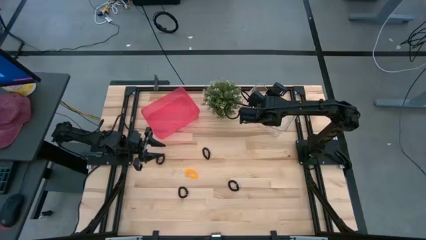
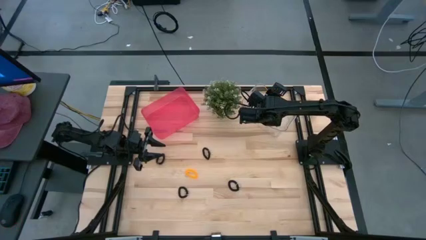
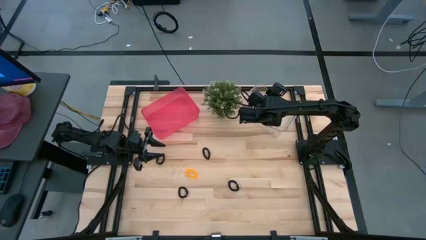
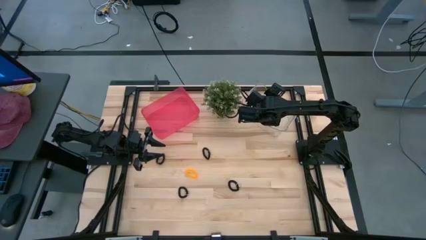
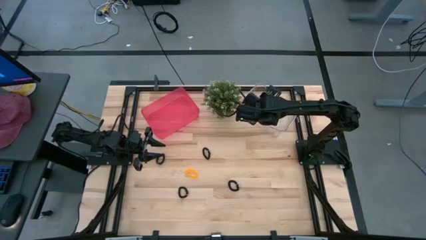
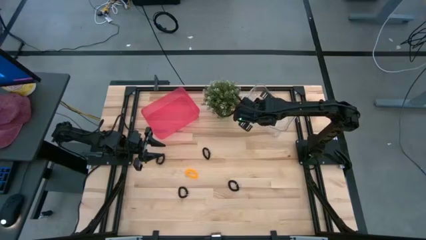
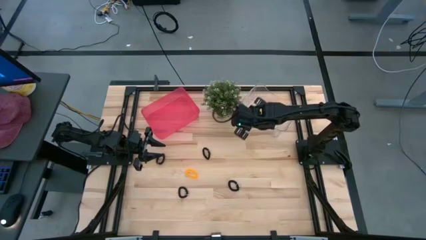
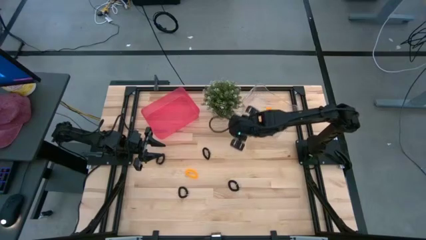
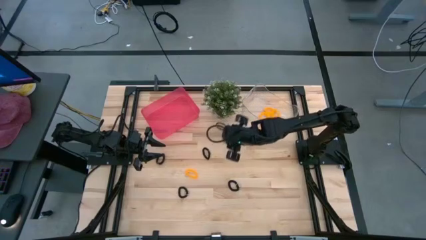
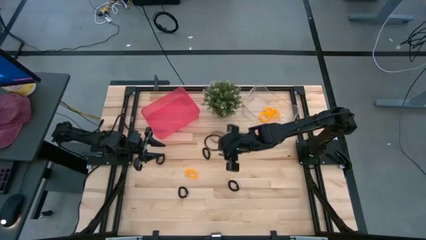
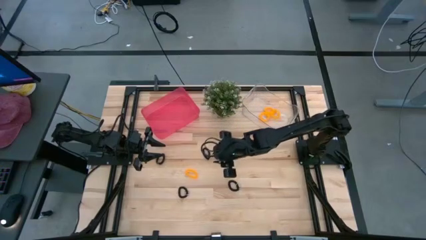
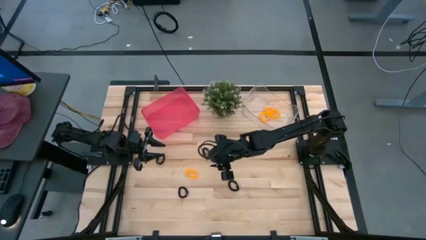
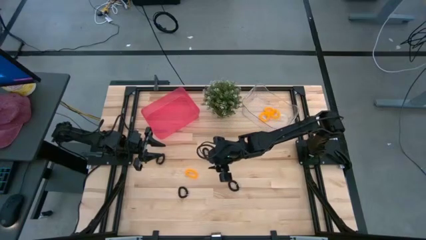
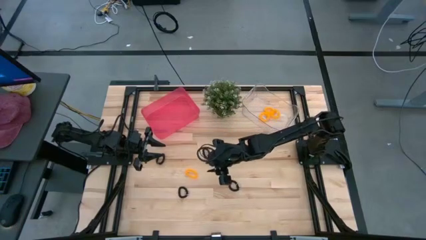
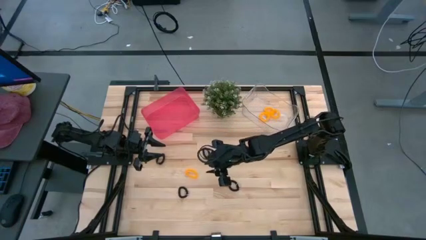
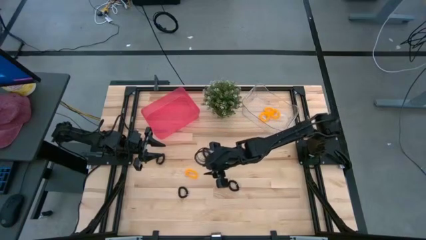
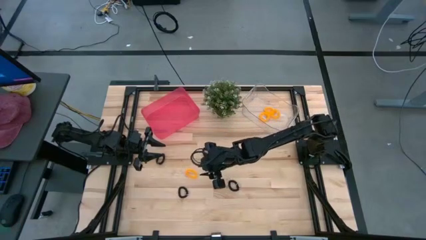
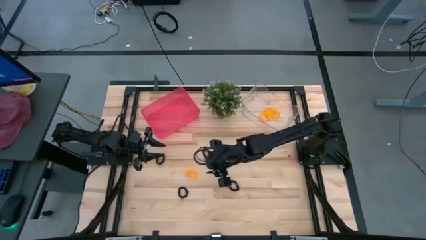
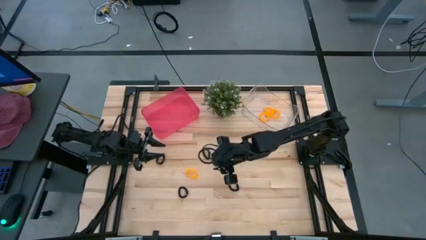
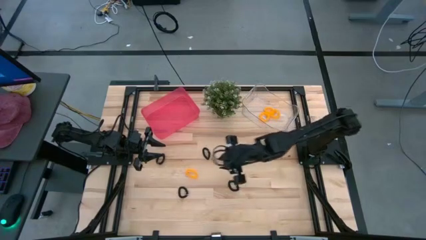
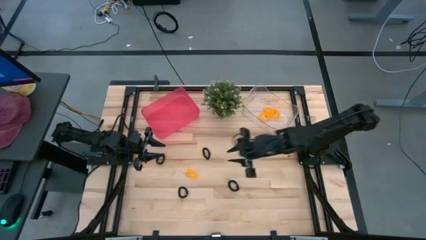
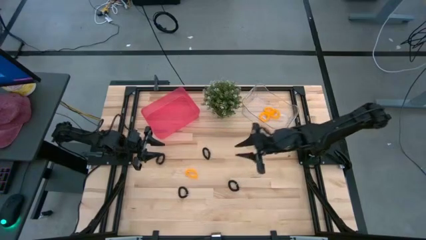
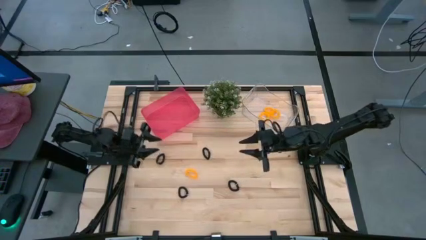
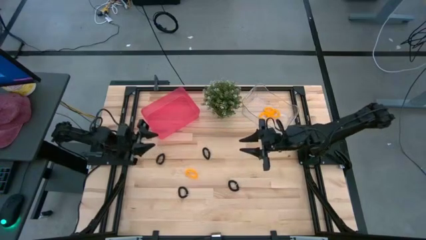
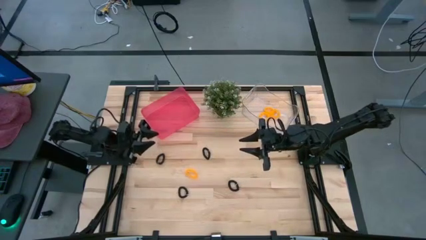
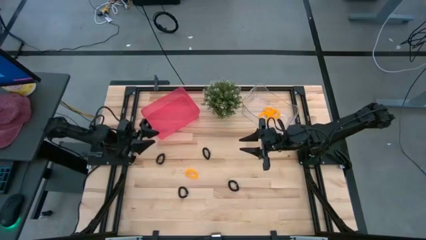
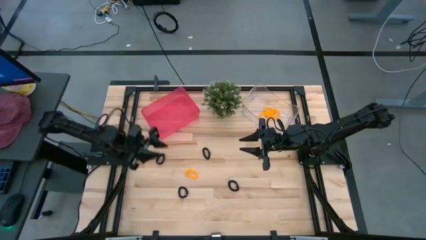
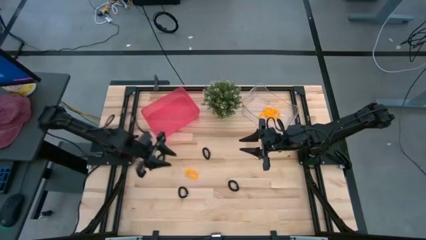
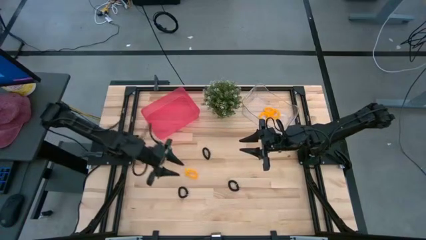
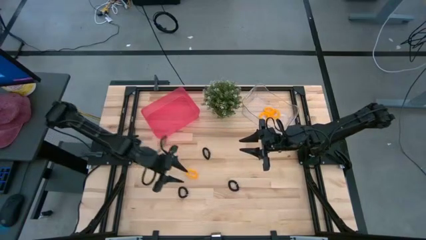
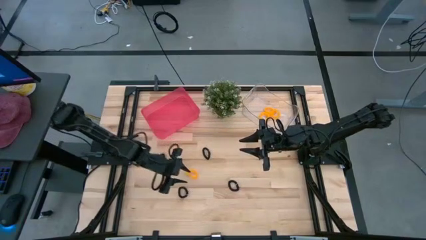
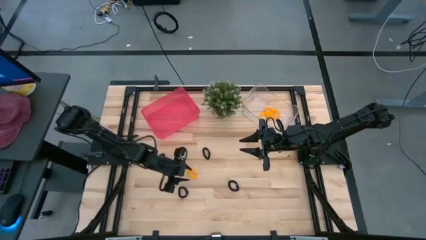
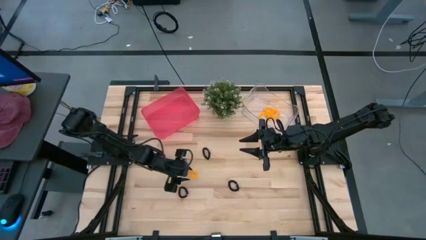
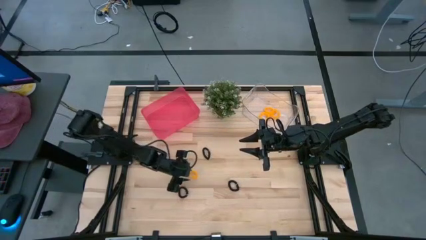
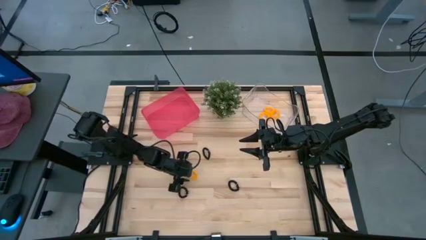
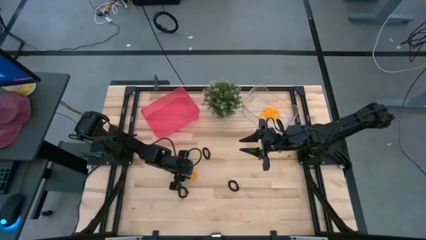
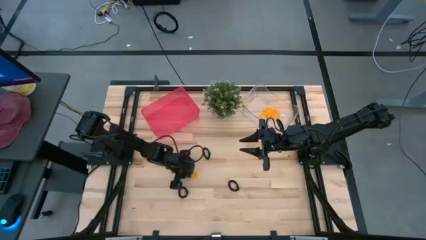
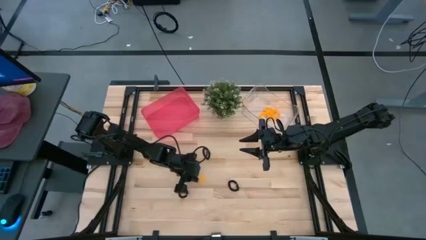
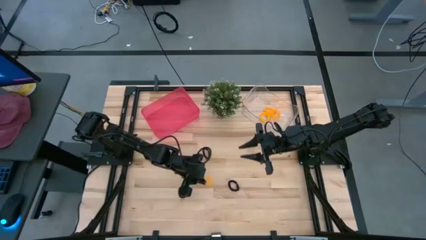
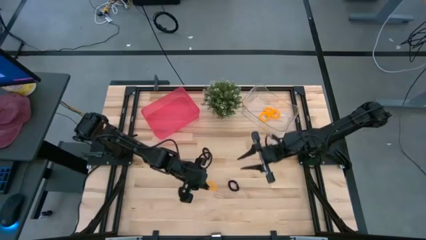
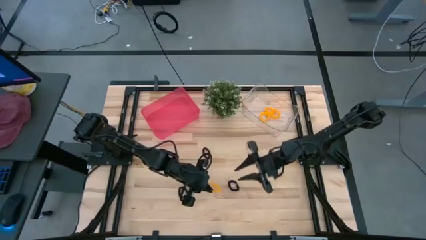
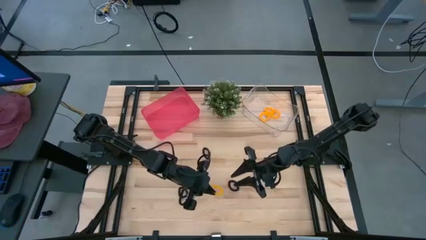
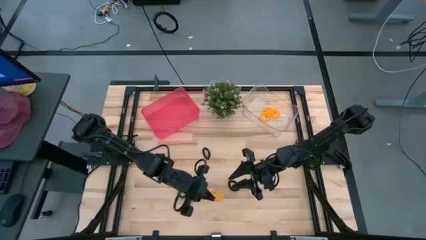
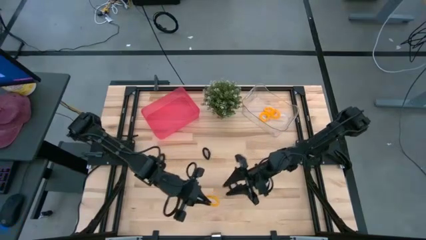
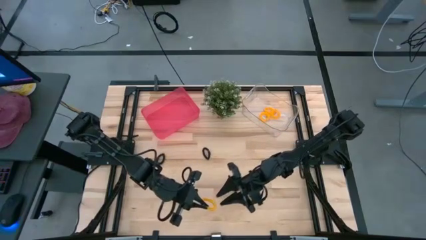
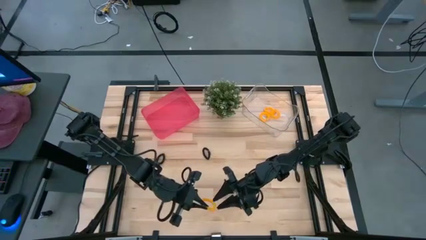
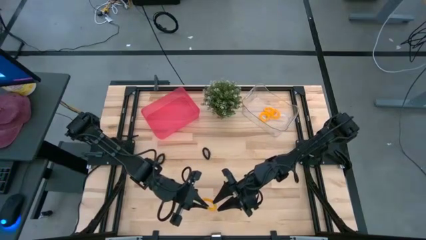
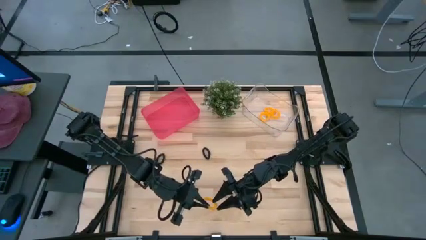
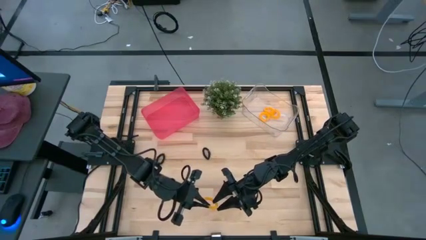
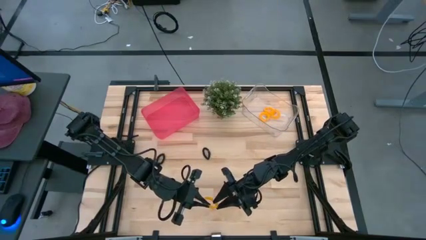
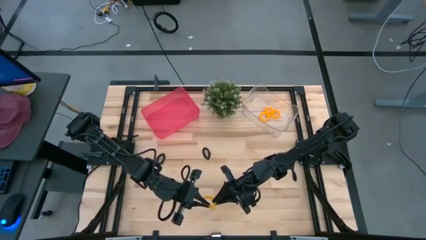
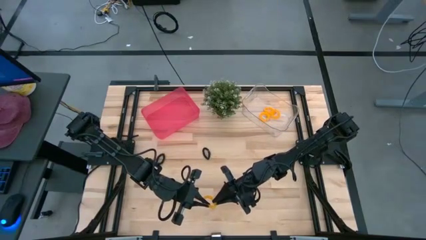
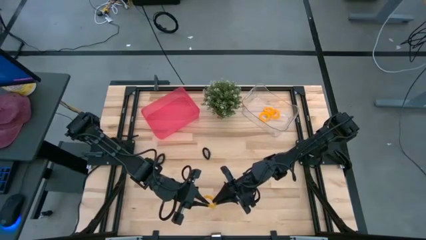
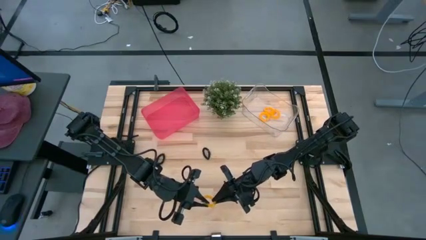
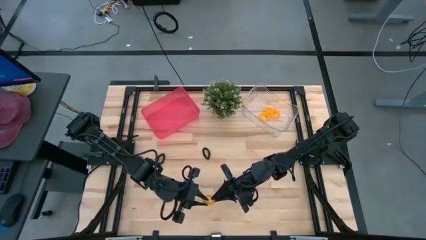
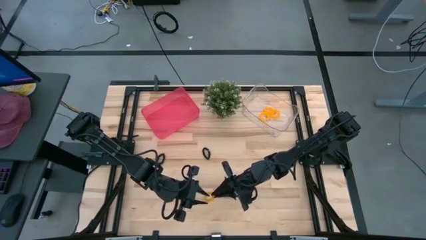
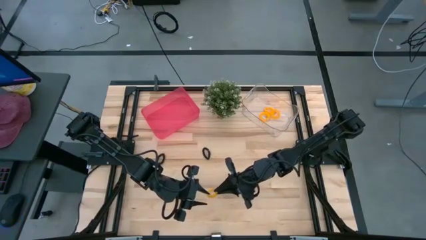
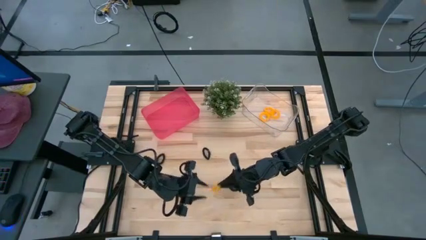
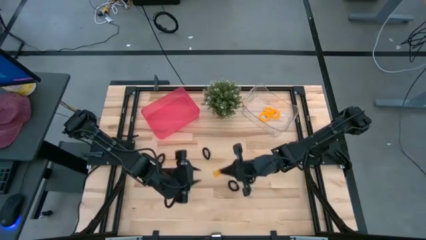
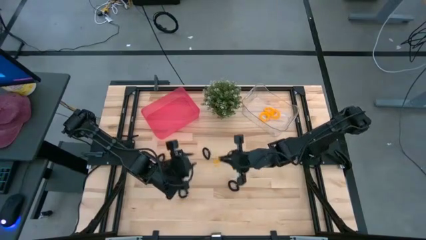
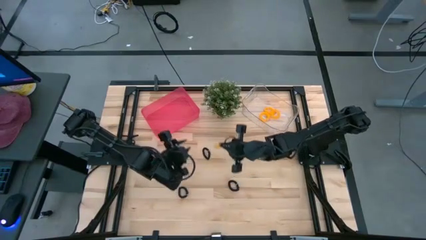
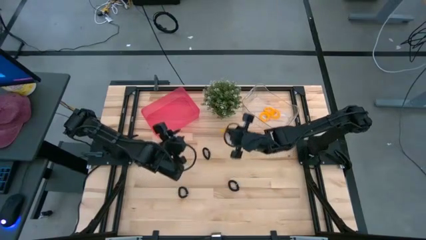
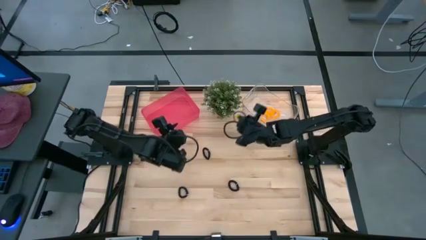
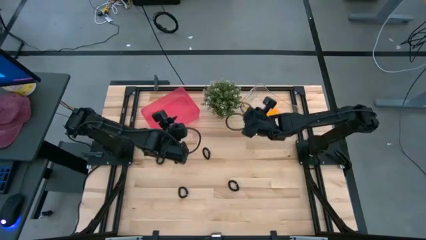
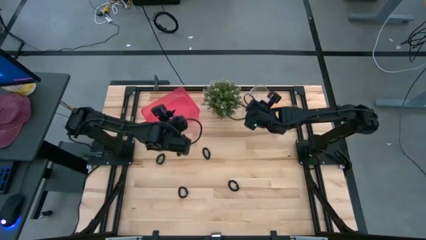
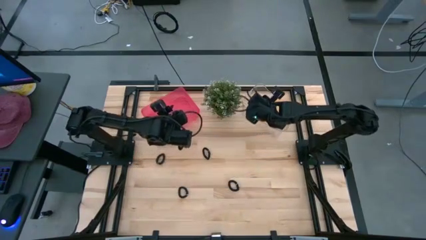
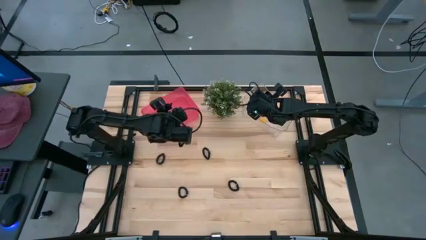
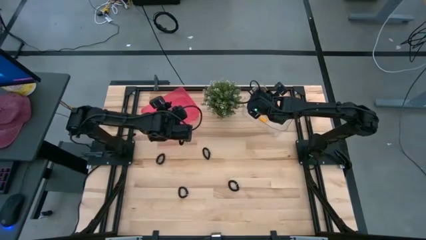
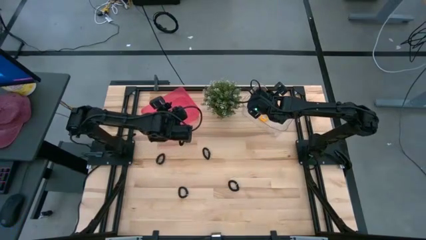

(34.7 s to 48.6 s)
Task: Sort spring keychains
Put the yellow spring keychain into the transparent bin
